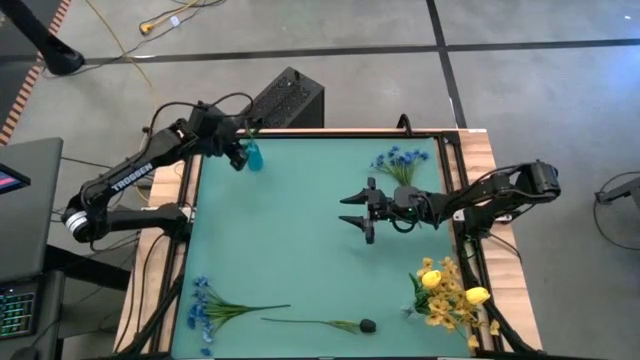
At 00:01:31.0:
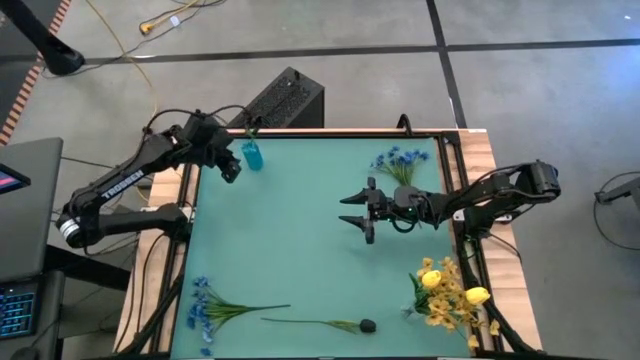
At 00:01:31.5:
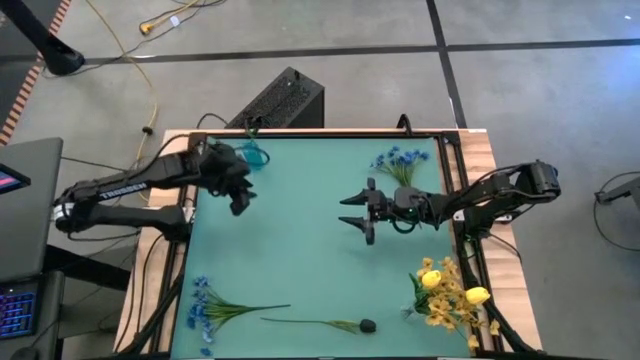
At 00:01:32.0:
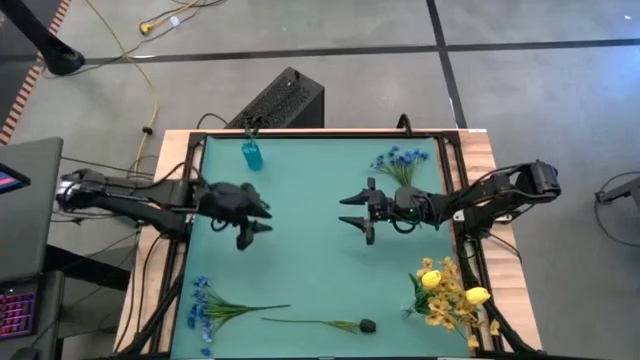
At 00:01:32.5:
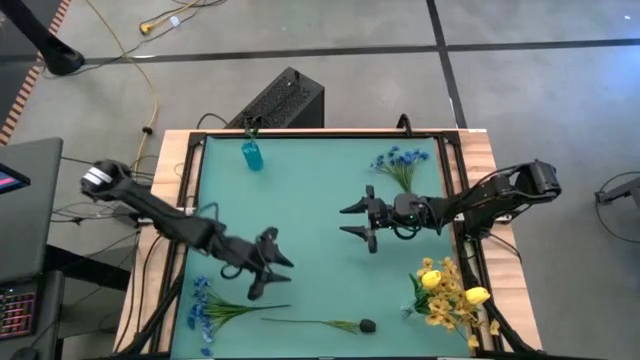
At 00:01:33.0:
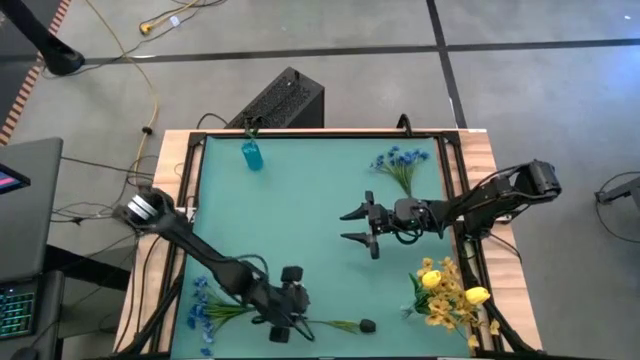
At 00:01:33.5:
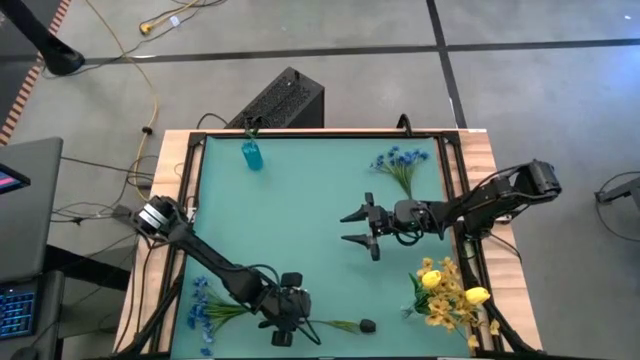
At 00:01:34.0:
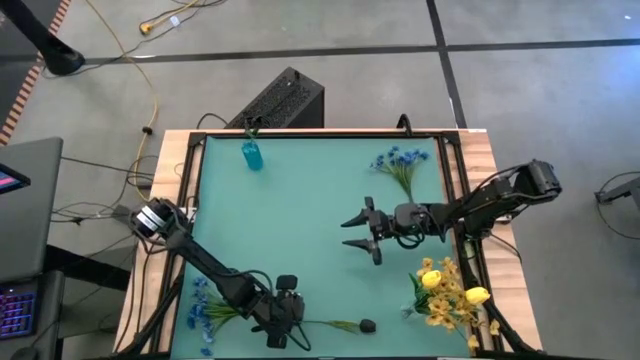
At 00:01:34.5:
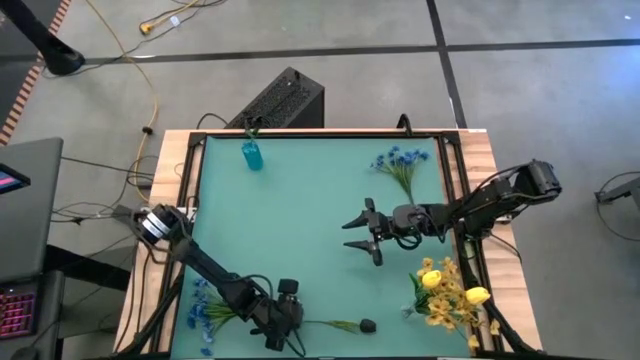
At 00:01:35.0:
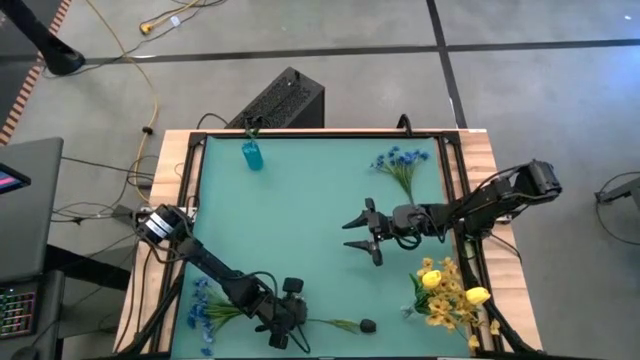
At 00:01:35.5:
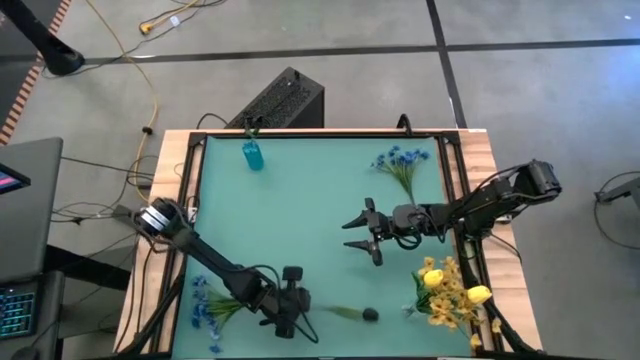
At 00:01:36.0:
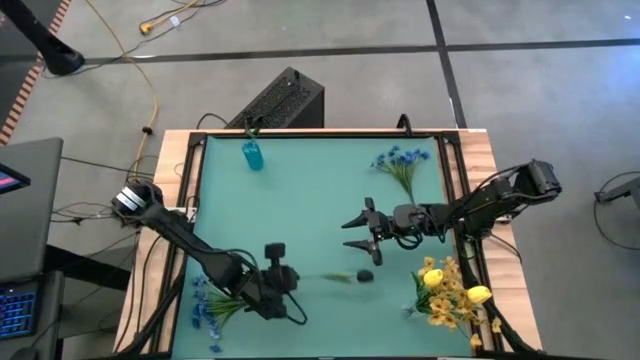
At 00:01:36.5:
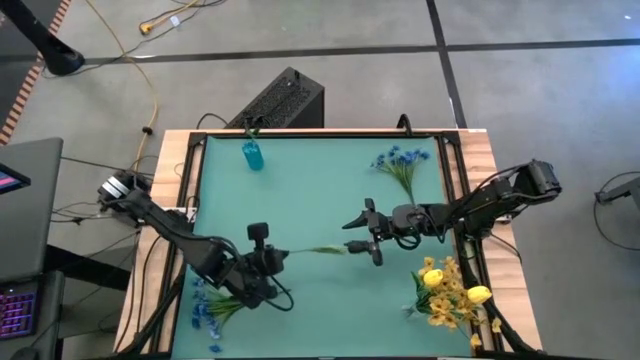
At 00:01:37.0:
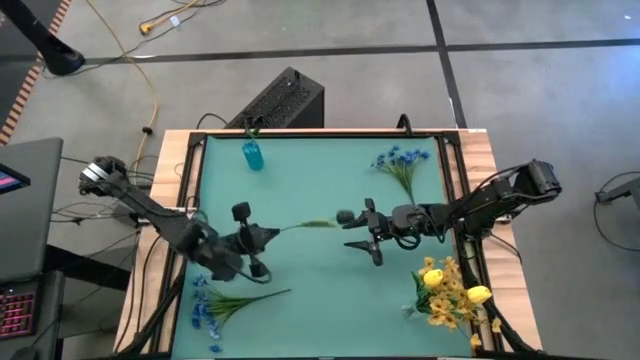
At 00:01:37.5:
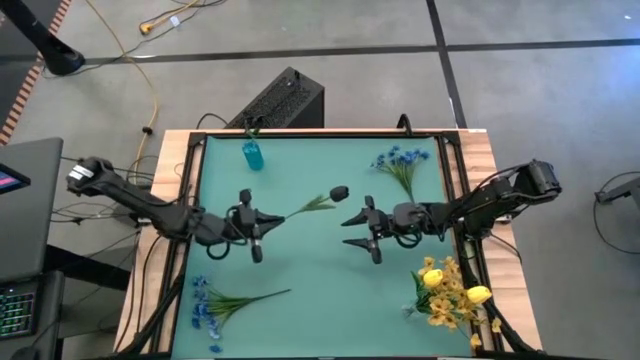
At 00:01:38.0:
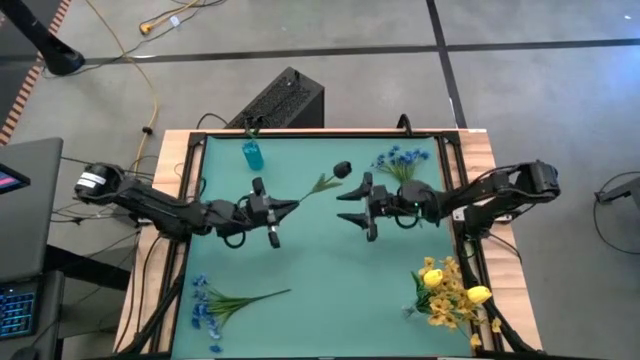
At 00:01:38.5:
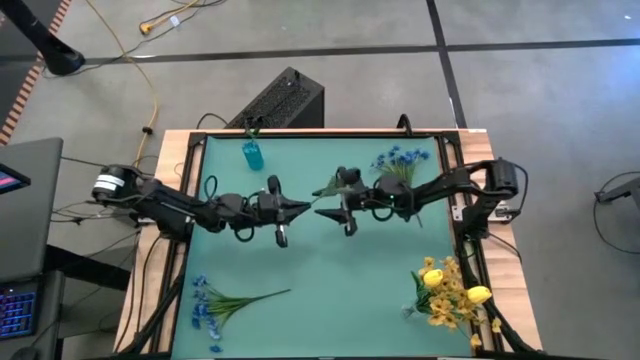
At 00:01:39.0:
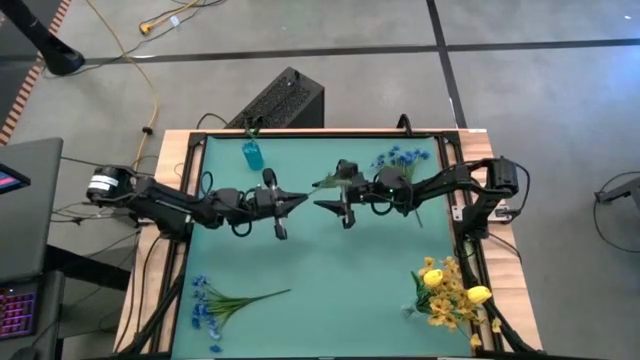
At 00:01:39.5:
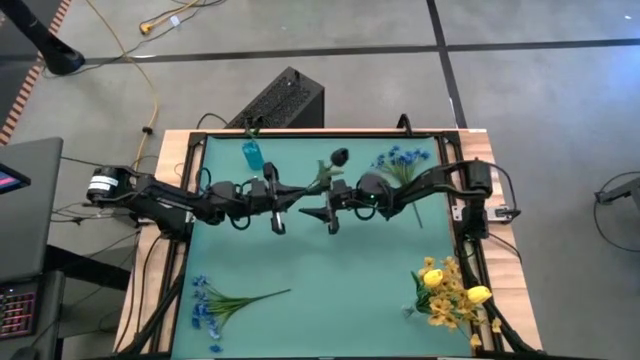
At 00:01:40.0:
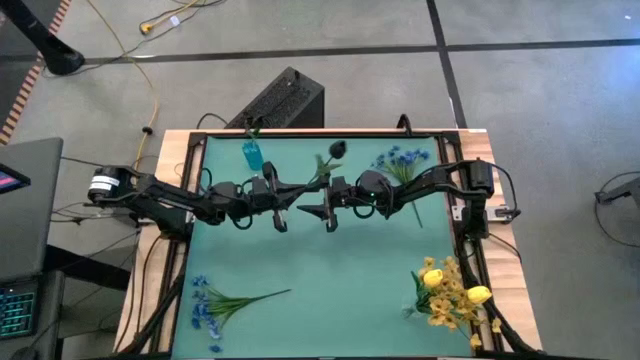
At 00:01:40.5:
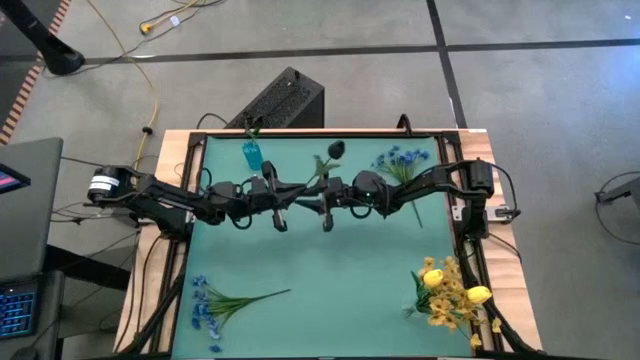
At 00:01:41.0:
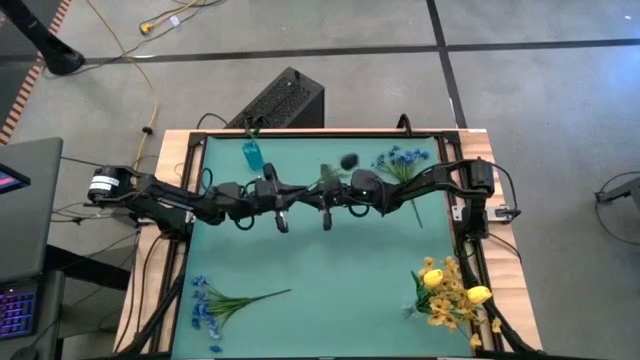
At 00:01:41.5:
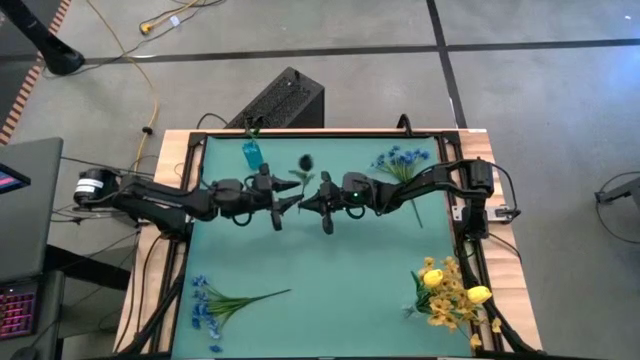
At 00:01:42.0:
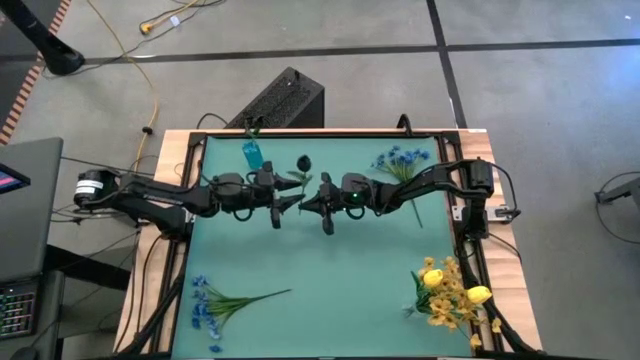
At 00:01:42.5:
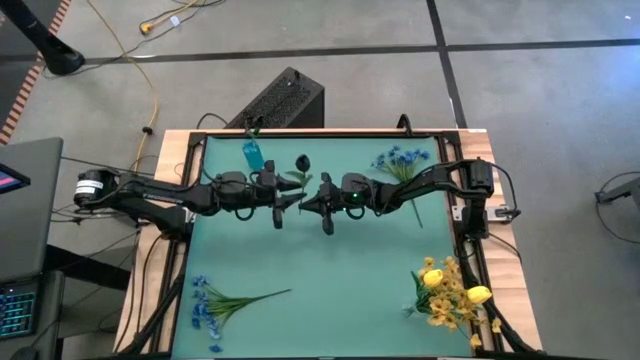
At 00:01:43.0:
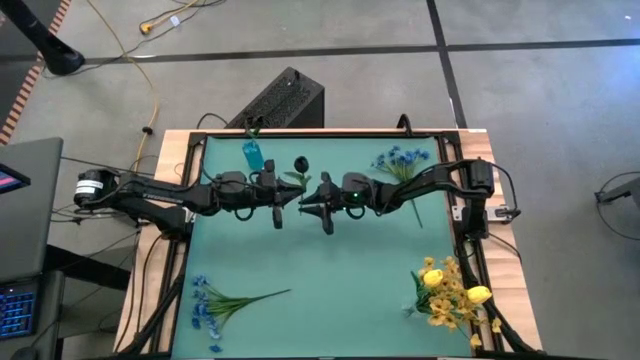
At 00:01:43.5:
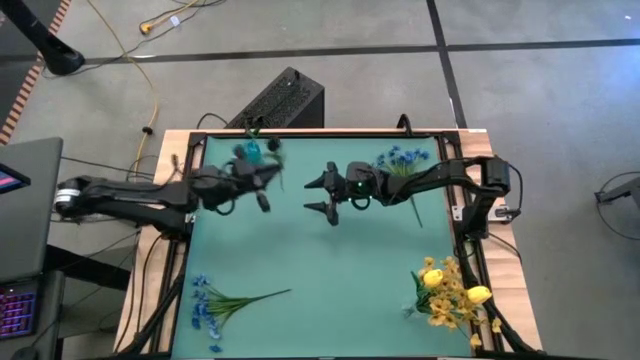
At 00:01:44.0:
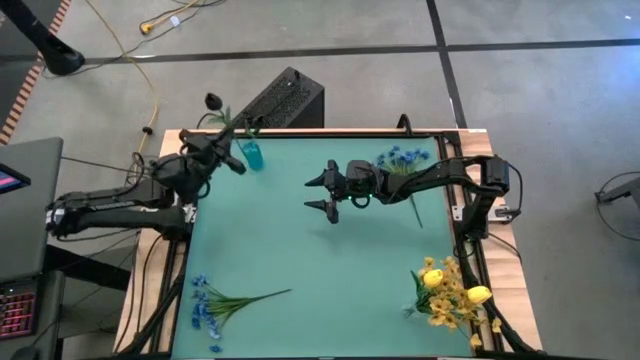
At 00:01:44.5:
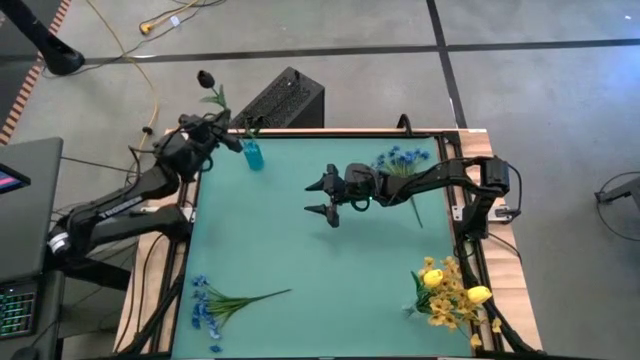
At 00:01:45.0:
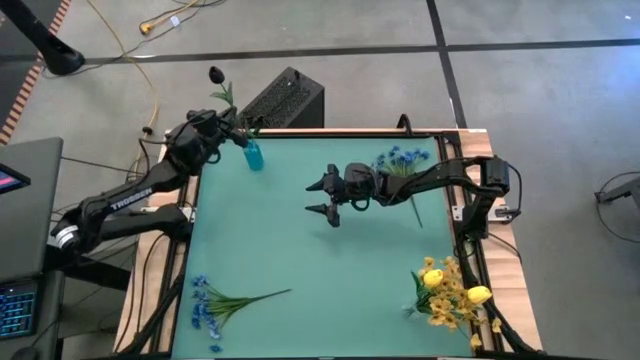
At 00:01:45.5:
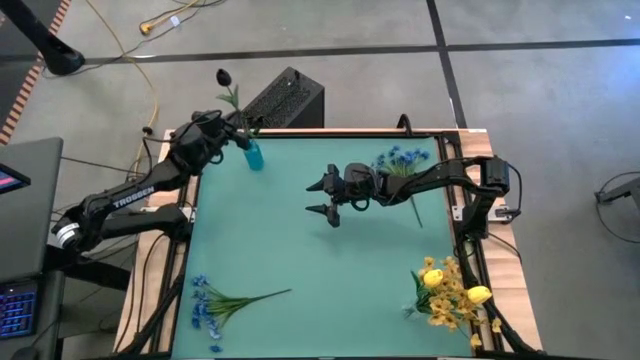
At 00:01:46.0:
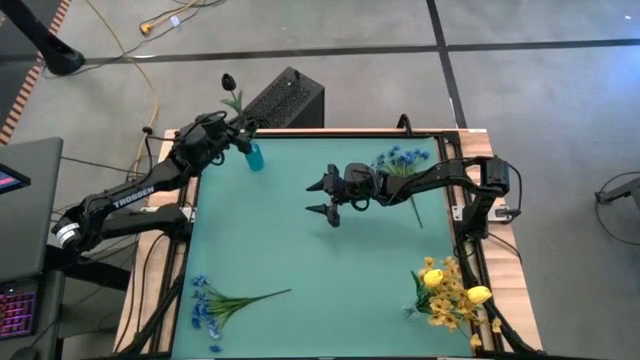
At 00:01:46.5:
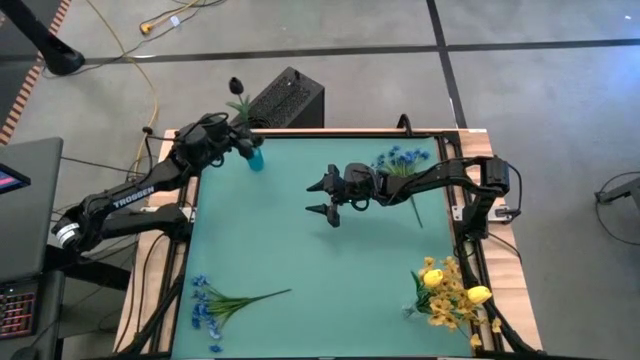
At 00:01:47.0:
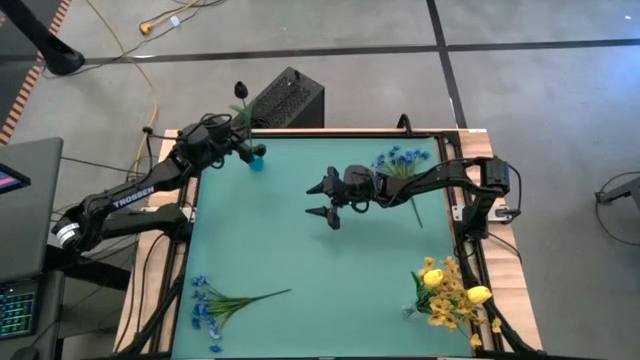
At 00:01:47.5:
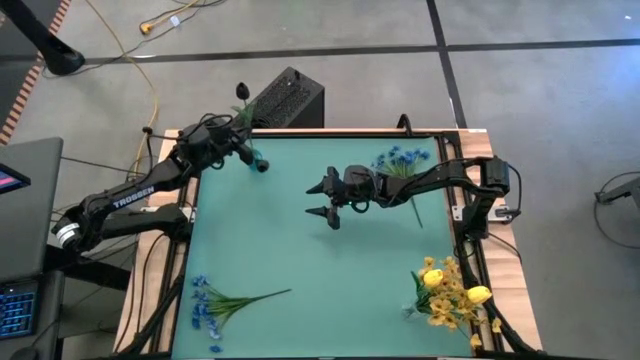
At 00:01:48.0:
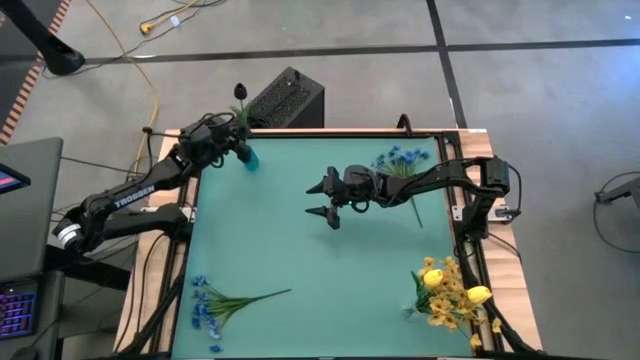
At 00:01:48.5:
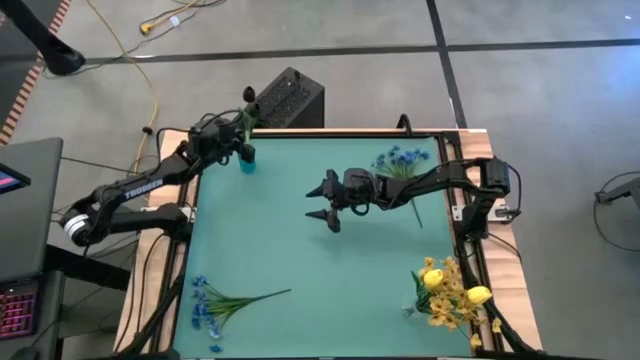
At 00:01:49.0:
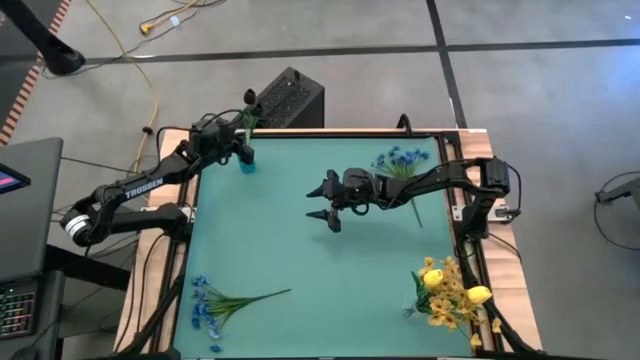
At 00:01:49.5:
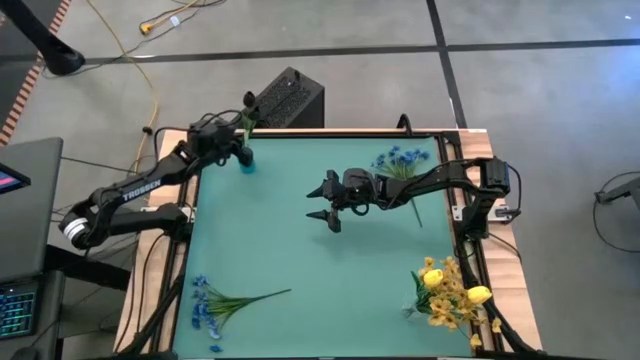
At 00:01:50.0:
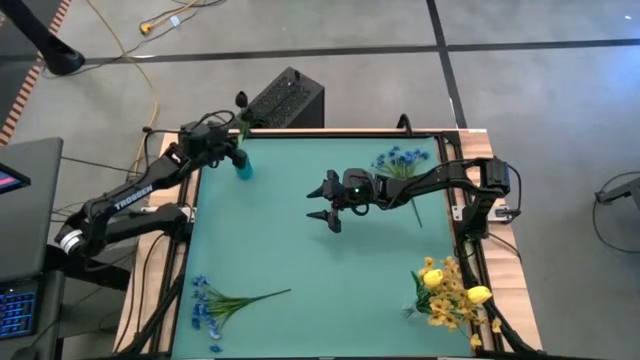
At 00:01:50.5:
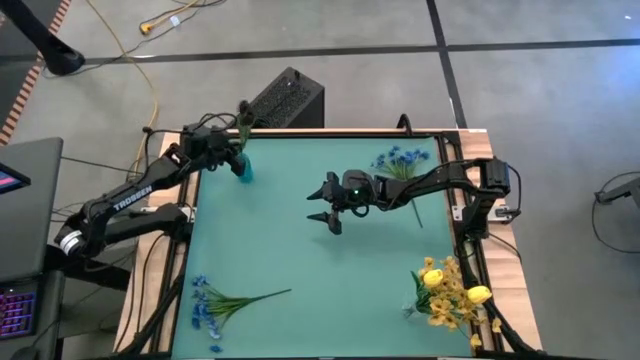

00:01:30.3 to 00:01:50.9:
Task: Sort flowers into vase by color
Put the black tulip into the blue vase
